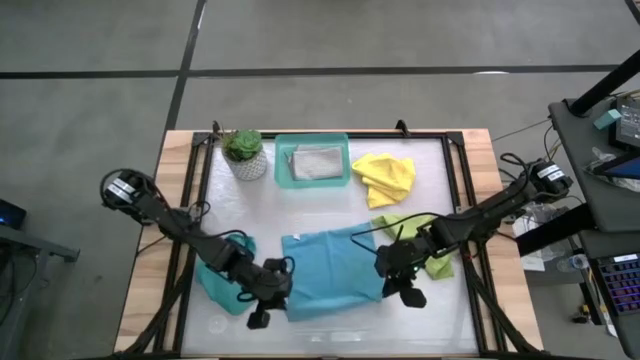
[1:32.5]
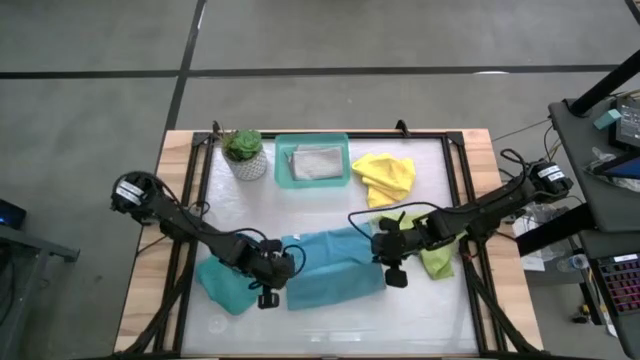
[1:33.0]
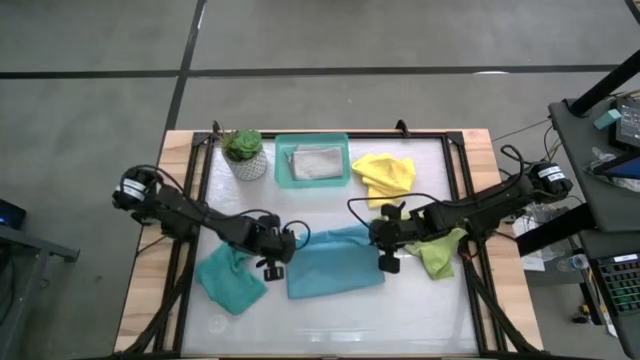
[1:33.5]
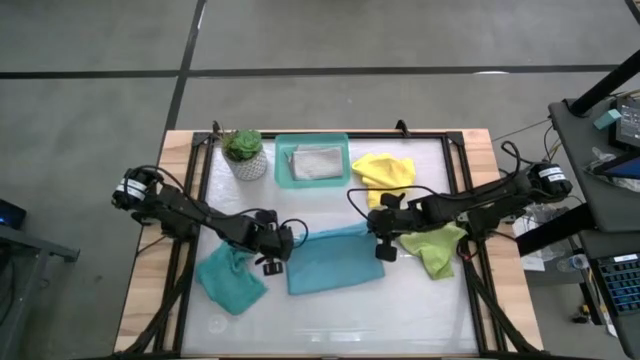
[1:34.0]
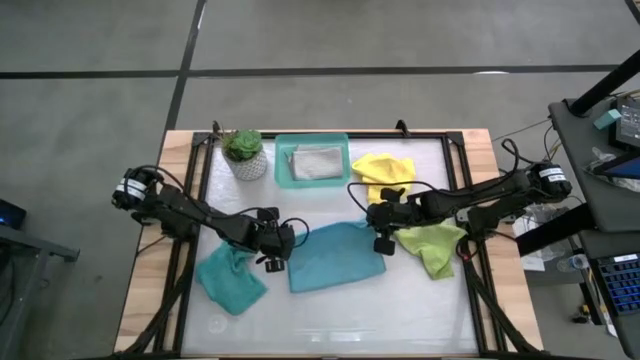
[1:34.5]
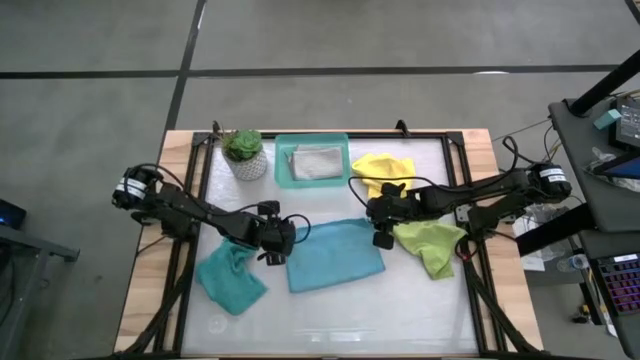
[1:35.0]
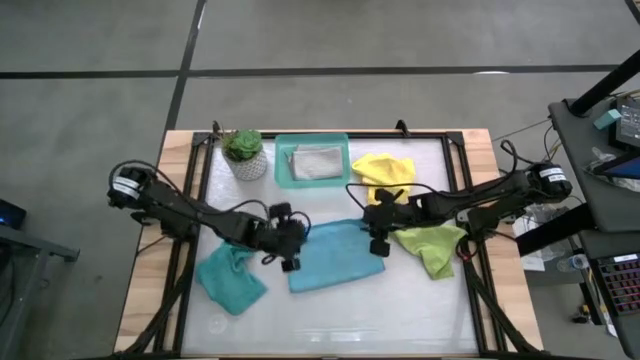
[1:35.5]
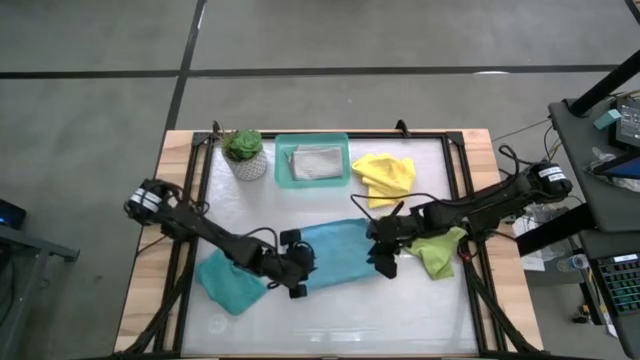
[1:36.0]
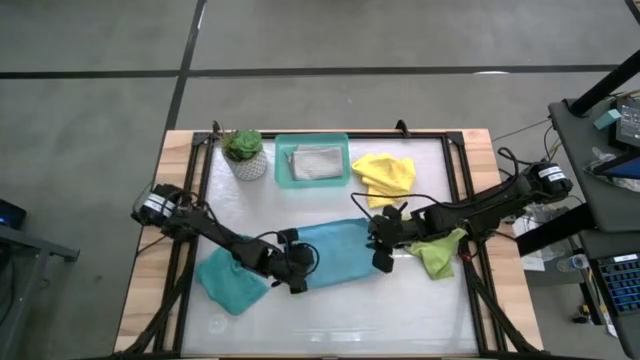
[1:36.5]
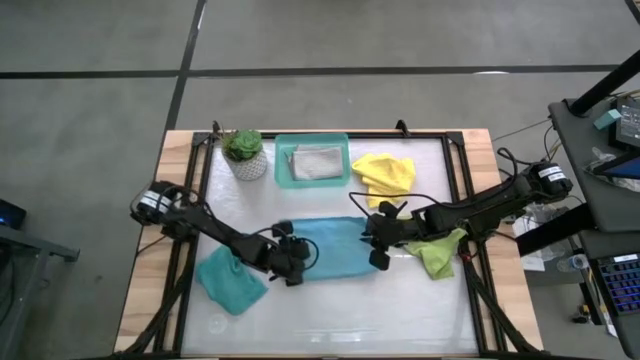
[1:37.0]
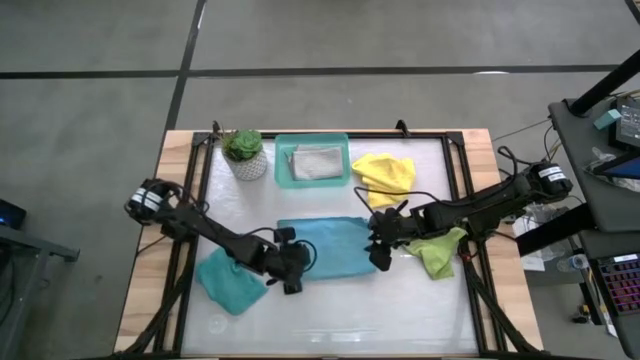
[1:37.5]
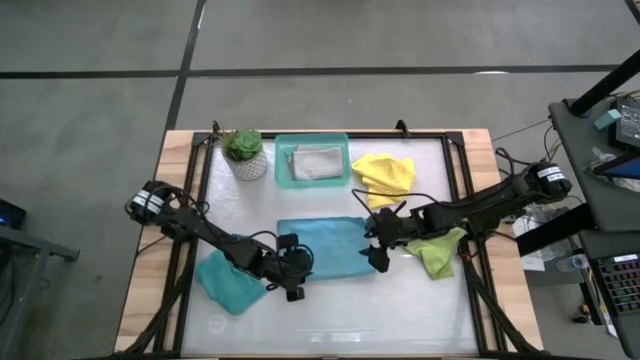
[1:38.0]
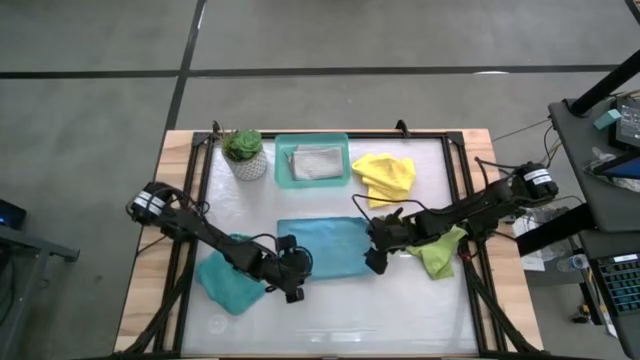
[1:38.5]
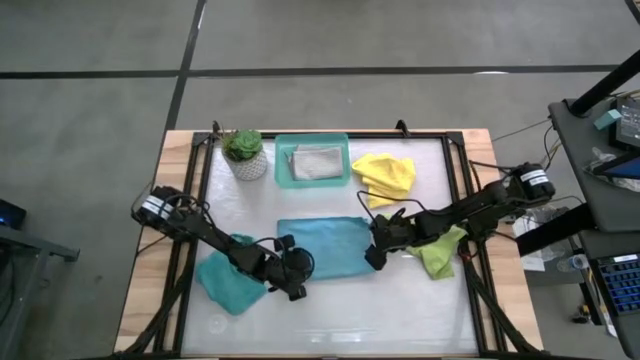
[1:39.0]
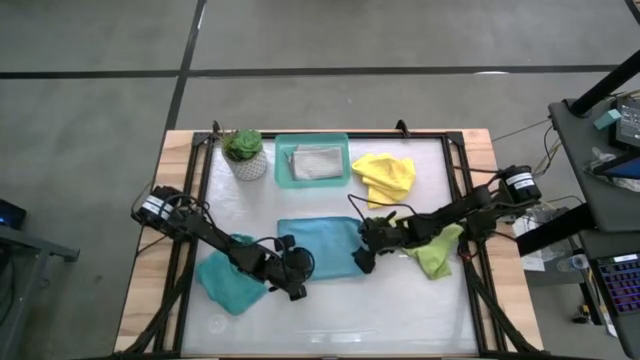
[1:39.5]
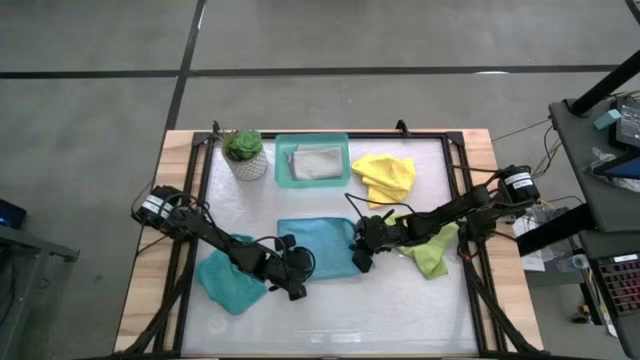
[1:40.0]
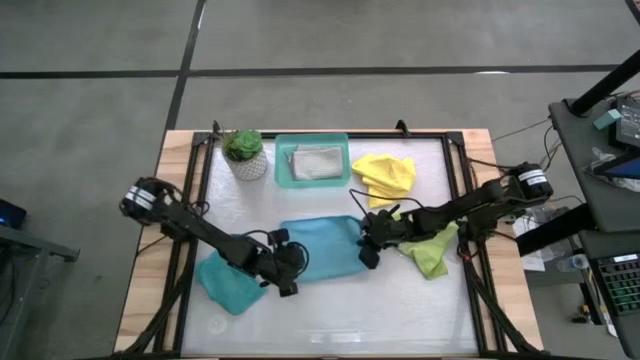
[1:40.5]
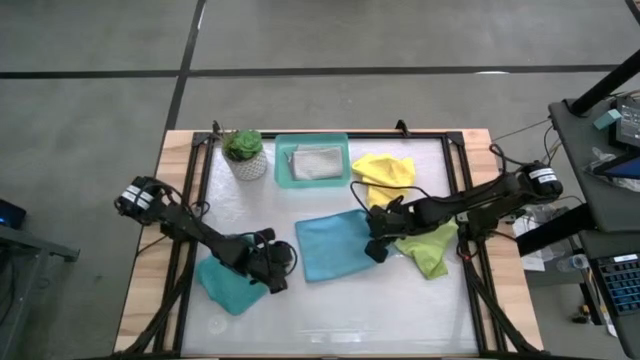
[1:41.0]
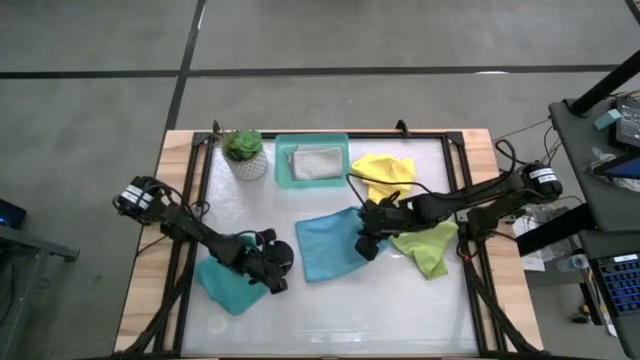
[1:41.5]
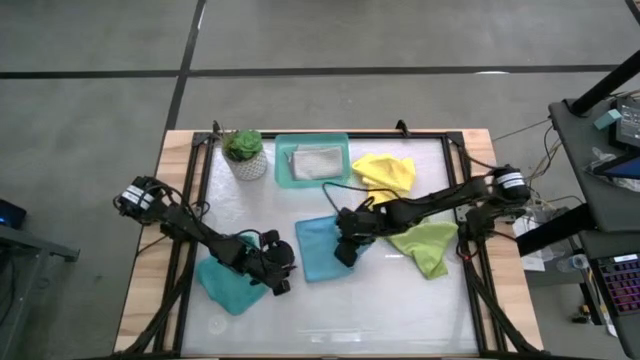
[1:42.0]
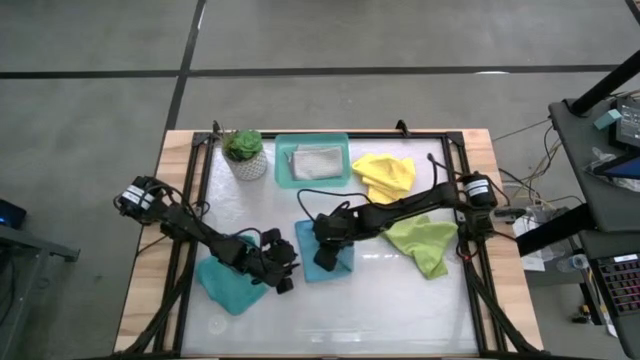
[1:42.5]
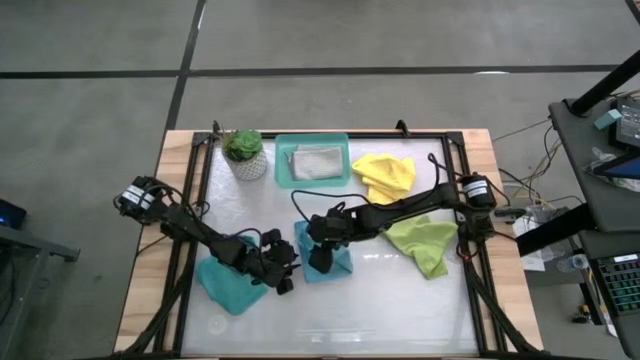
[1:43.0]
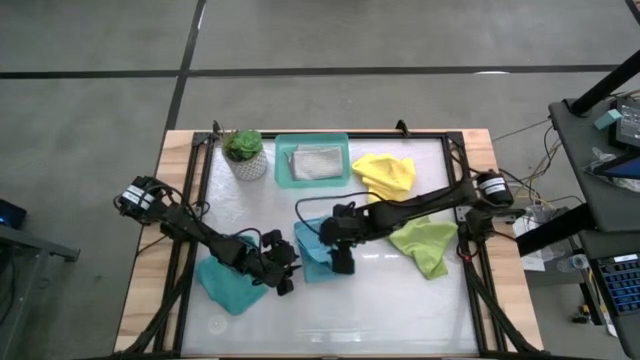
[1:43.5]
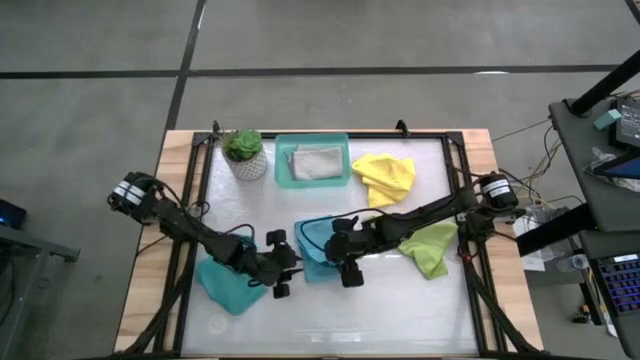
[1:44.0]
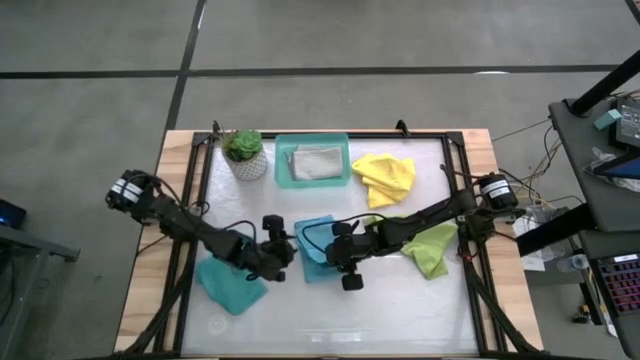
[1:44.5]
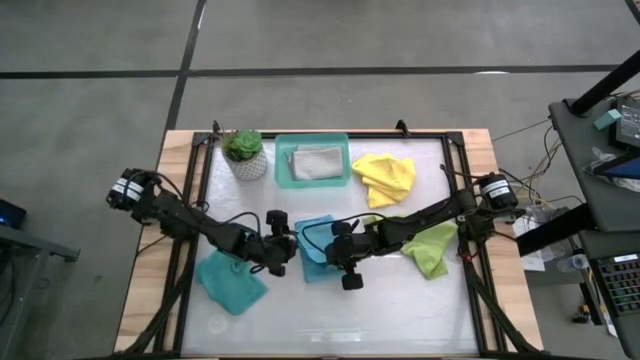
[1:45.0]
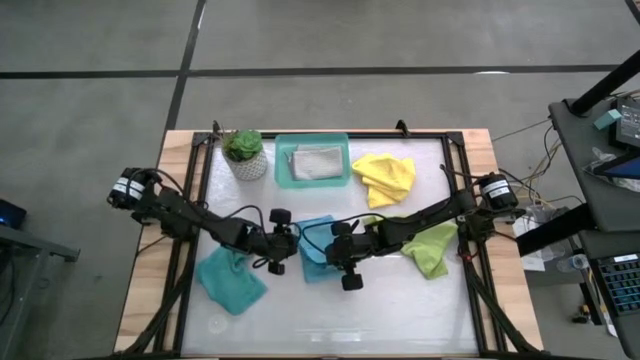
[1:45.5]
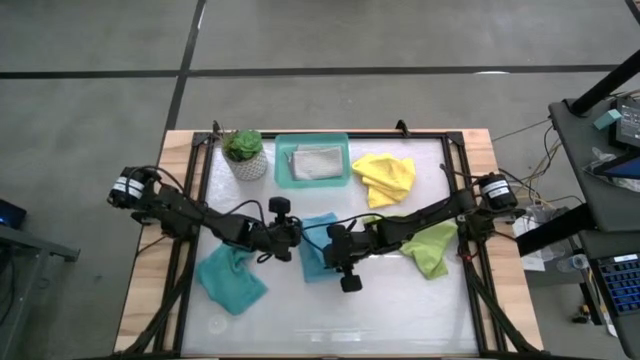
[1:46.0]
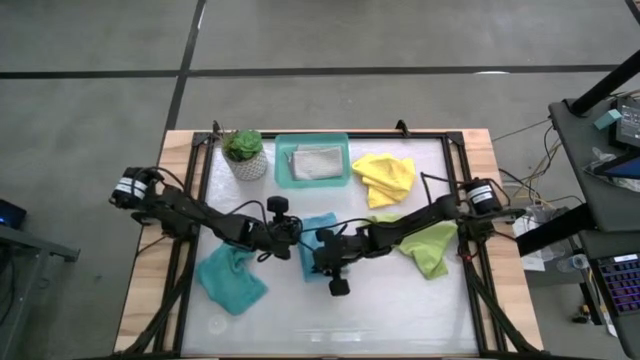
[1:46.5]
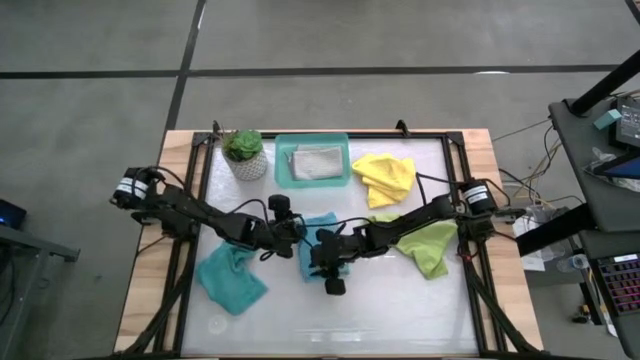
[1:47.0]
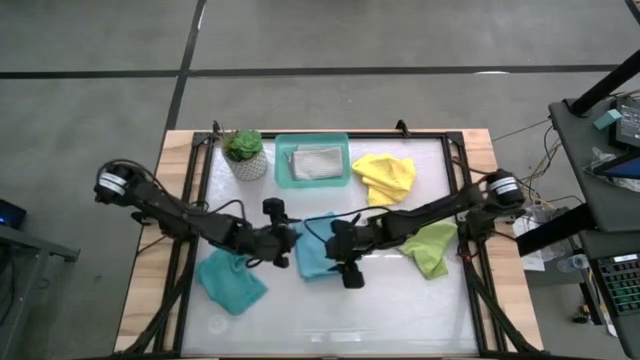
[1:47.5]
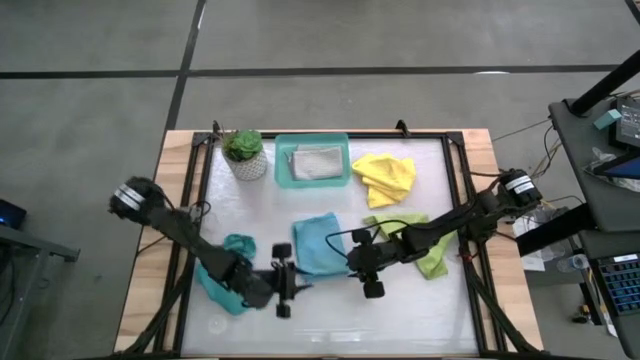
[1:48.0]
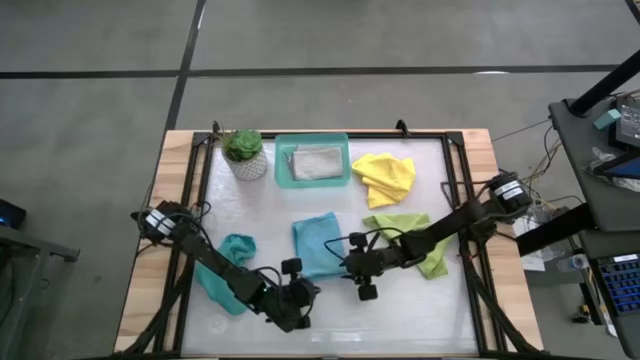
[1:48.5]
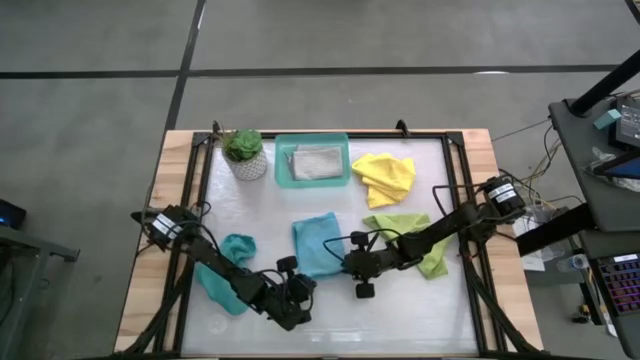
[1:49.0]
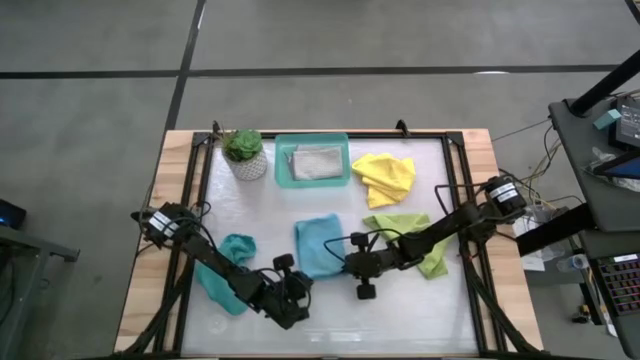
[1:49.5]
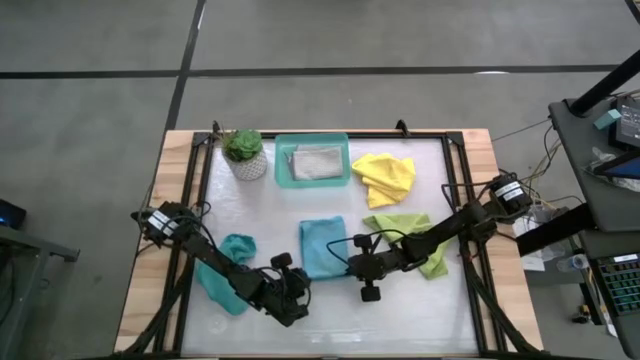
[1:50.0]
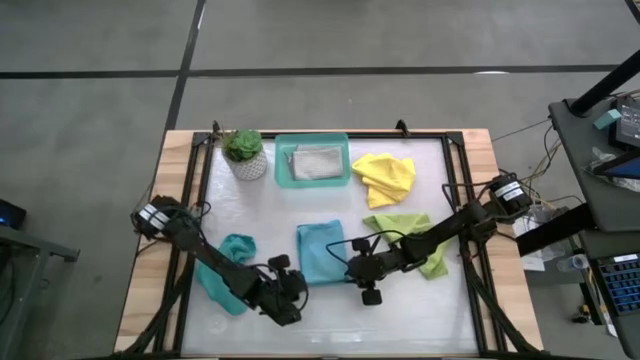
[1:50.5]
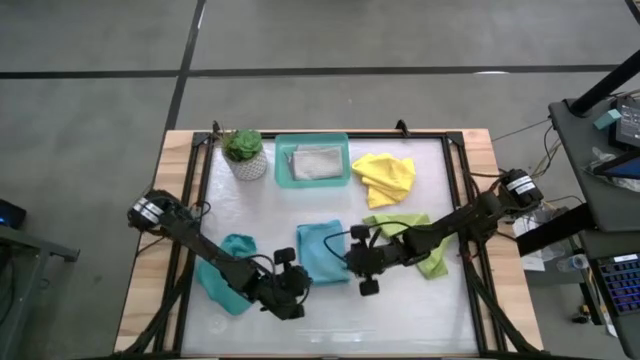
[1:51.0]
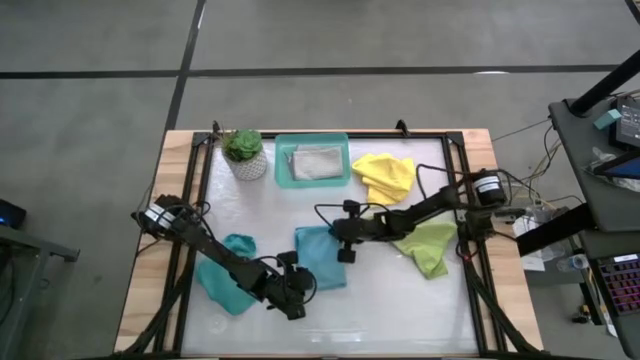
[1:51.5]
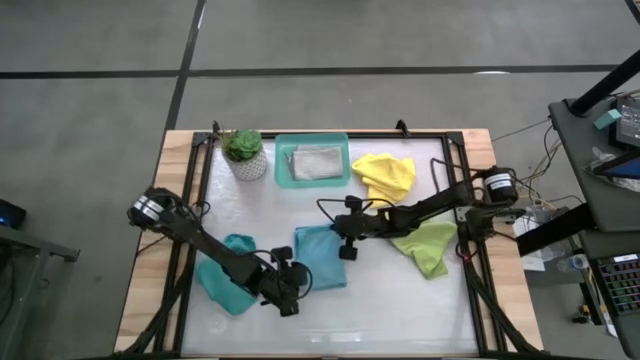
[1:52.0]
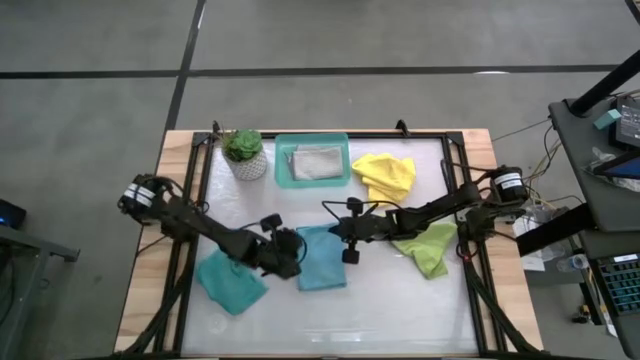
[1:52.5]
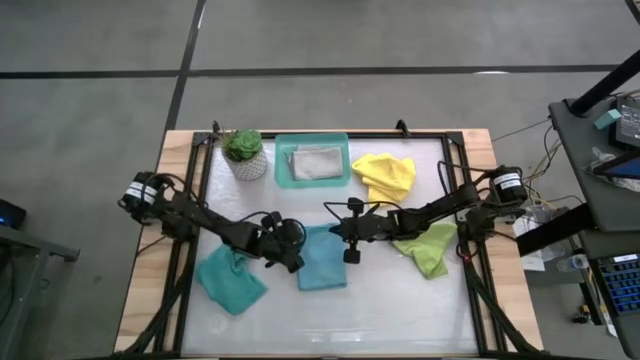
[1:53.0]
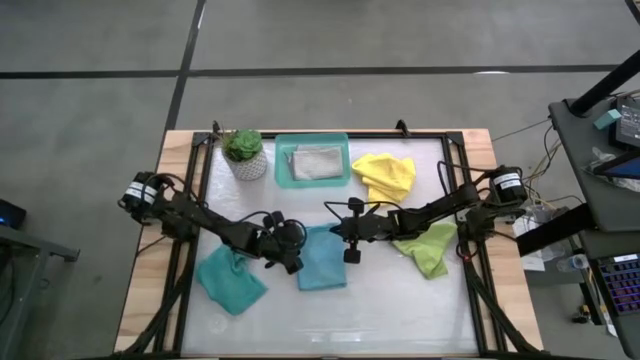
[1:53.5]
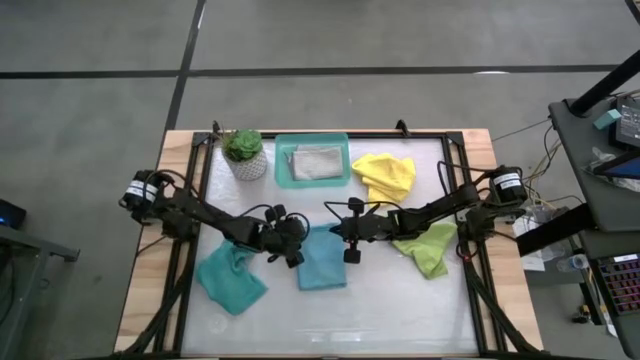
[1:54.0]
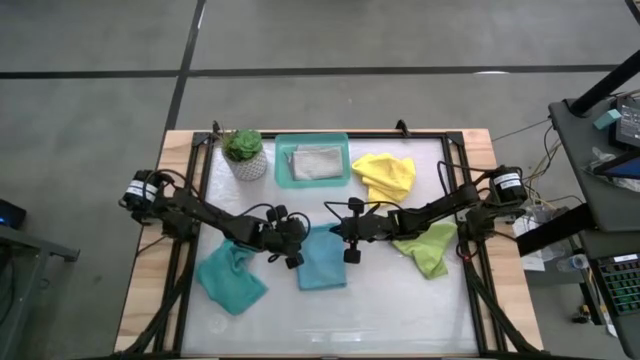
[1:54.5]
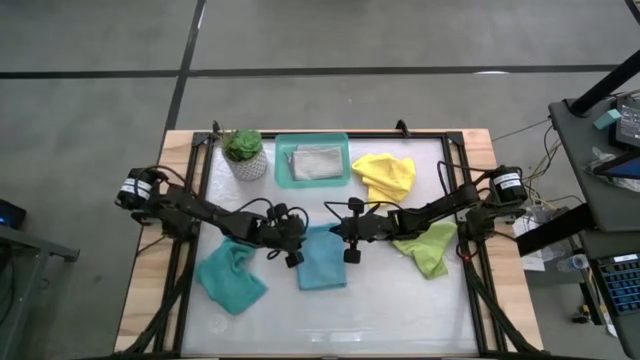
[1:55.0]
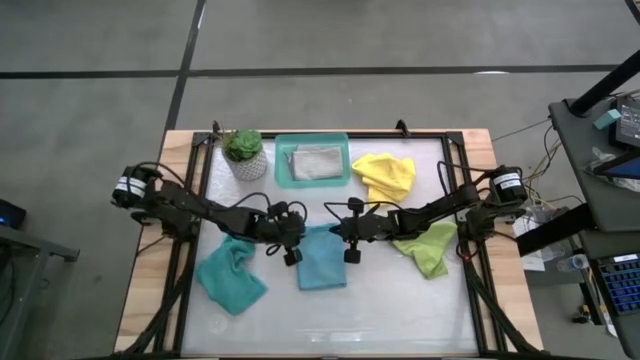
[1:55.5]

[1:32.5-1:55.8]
Task: Fold microfiber towels
Fold the blue microfiber cloth
